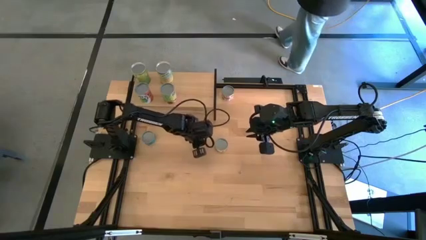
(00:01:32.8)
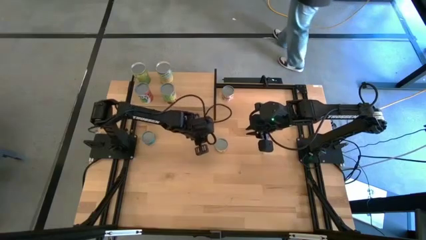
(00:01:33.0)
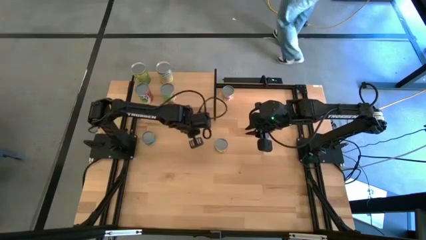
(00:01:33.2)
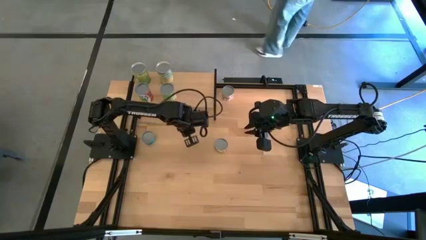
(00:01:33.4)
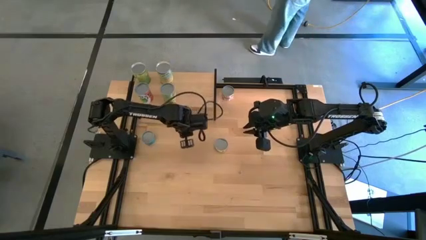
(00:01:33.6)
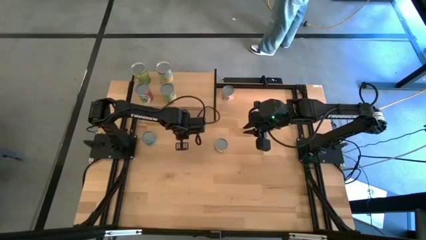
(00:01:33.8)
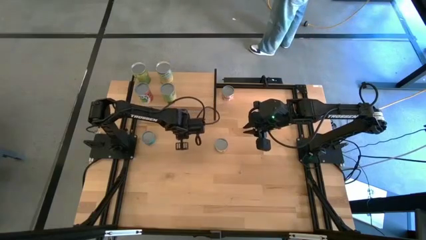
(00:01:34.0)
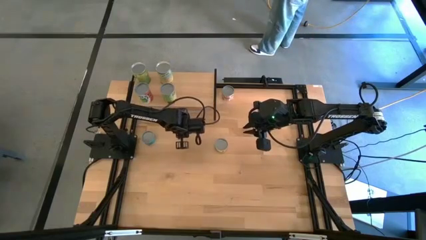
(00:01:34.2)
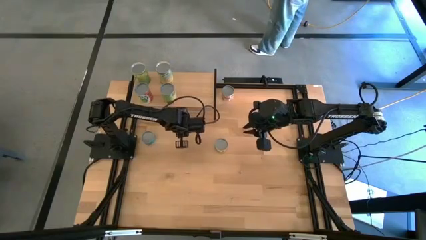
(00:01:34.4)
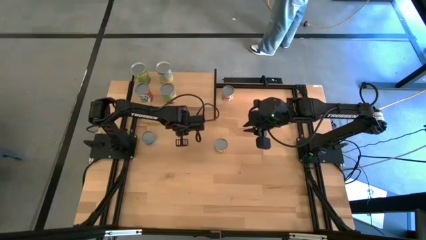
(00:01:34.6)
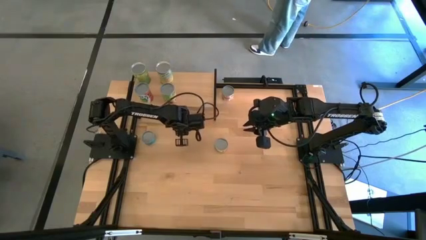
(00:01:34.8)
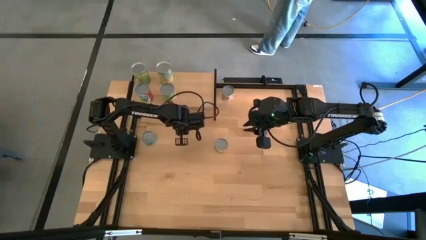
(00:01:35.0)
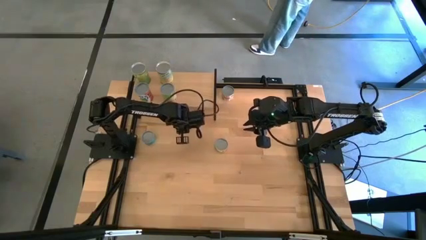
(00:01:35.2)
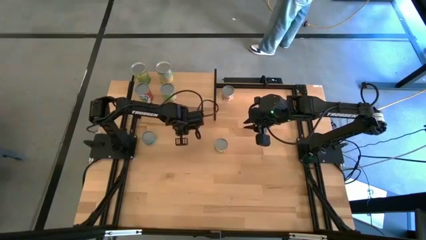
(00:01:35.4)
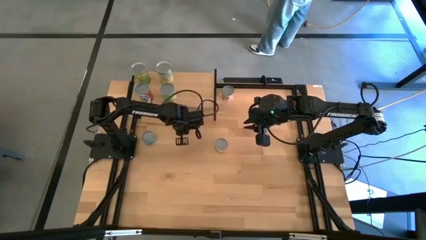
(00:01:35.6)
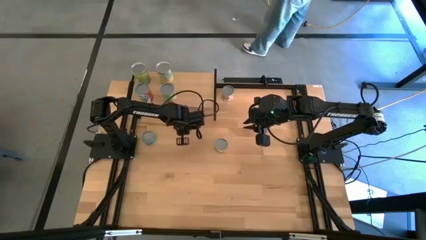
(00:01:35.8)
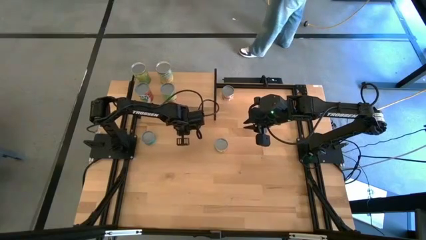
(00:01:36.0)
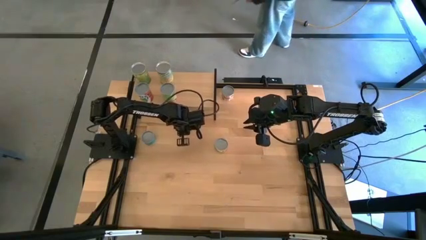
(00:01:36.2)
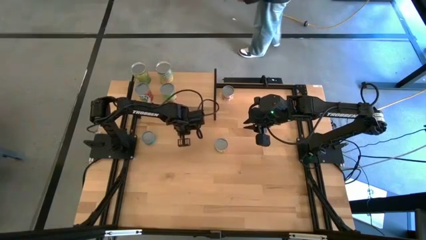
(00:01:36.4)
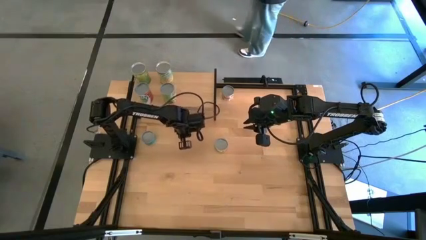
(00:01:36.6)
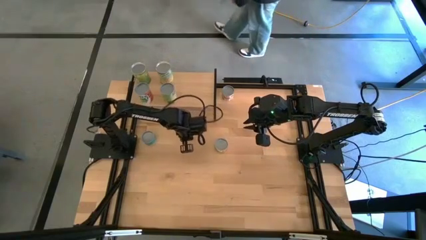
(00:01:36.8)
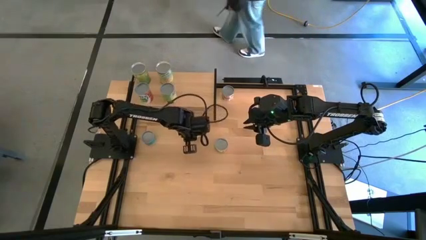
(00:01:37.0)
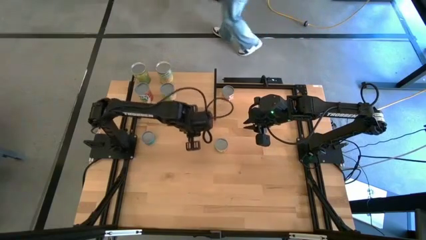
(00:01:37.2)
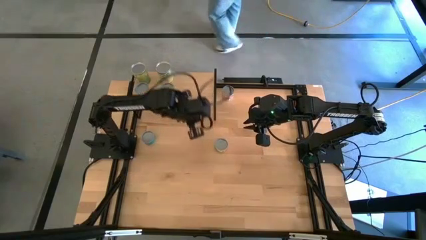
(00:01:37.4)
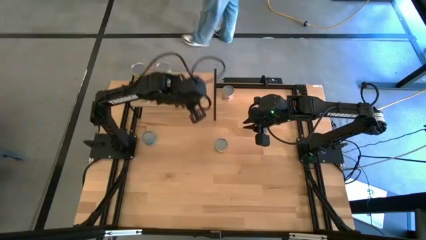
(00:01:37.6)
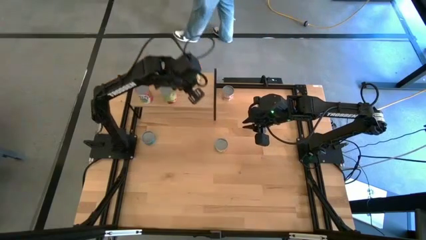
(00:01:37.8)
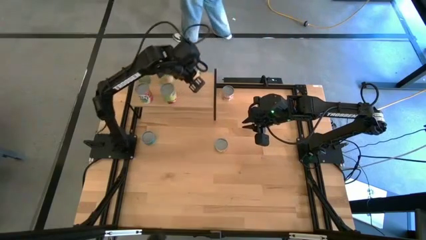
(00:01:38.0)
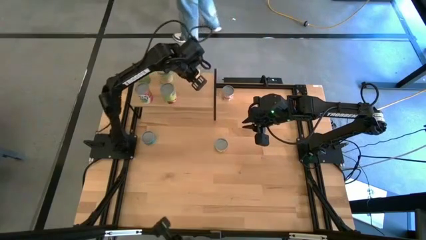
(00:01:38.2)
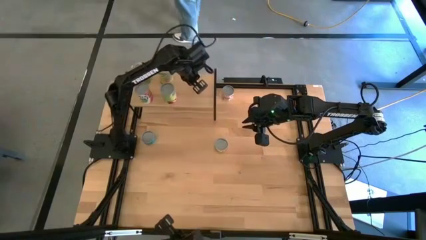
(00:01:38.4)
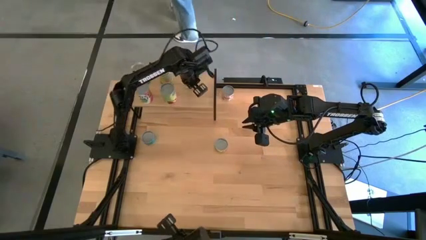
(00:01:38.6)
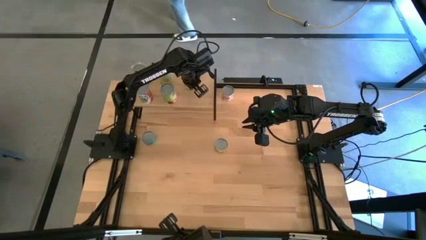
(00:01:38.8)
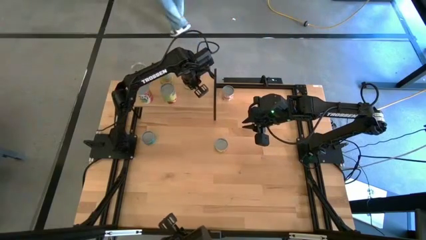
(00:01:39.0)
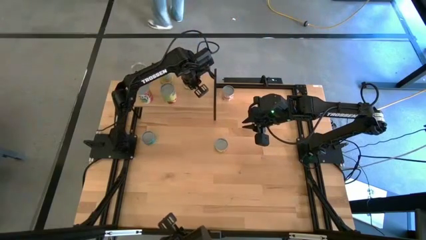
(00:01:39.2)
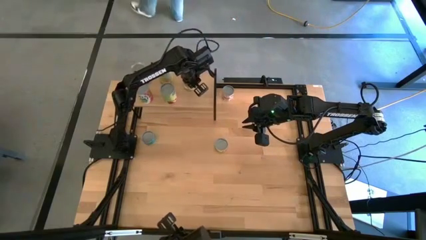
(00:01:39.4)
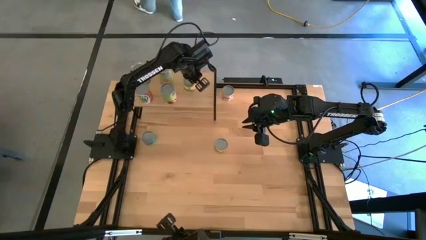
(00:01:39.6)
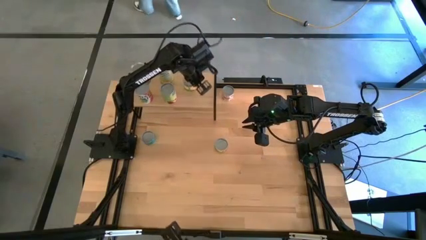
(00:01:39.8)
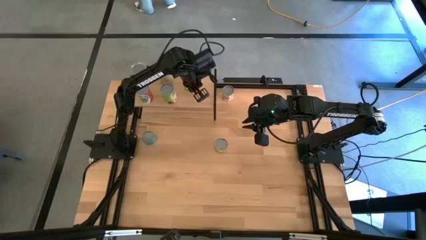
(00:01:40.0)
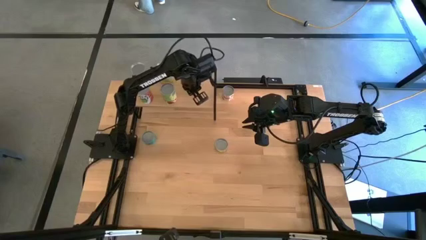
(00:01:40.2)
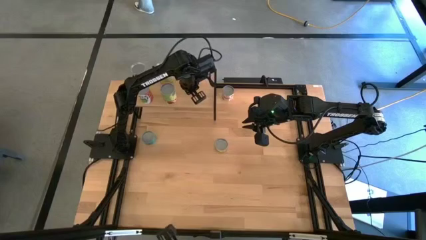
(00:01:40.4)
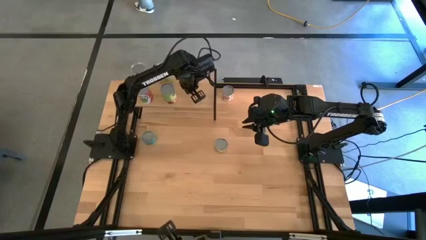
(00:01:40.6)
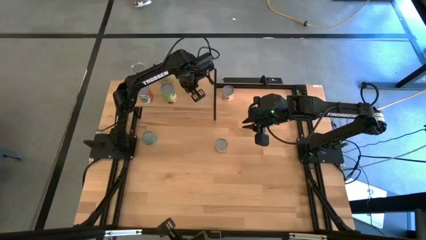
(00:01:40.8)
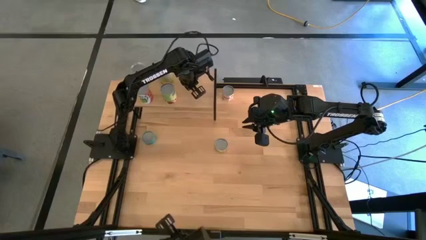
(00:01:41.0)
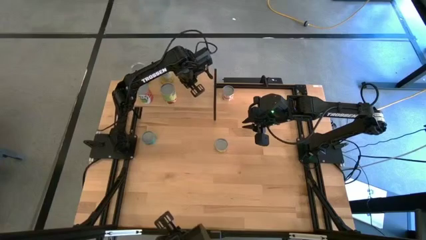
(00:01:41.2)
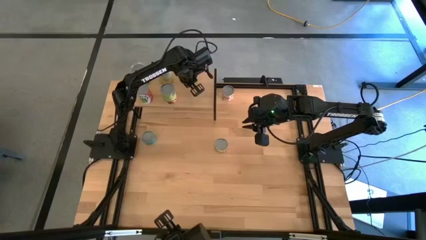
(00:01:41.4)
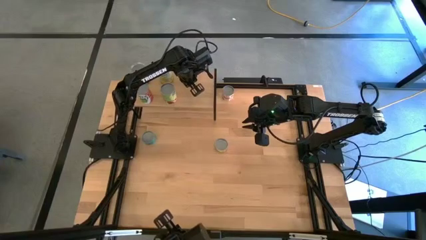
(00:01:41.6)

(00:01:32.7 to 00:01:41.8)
Task: Pick and place cans onto a shelf
Put the canned peaches on the shelf

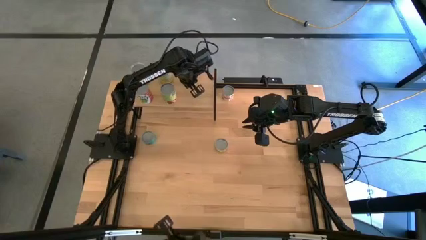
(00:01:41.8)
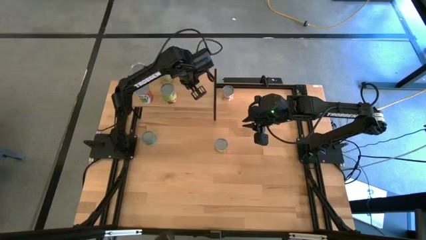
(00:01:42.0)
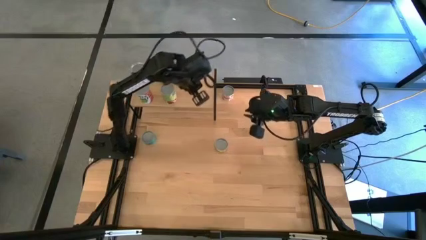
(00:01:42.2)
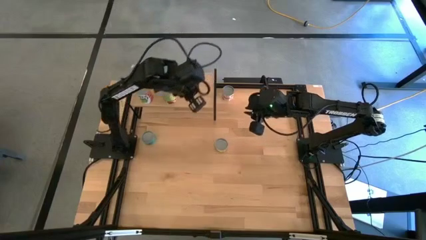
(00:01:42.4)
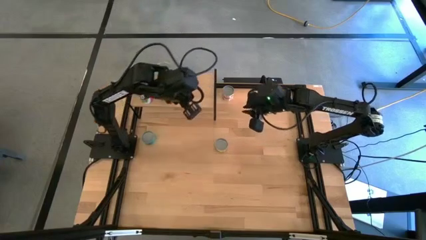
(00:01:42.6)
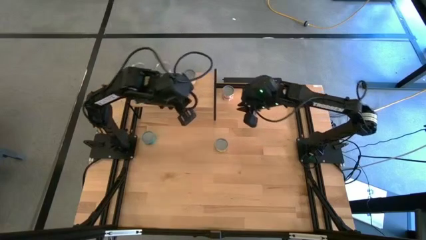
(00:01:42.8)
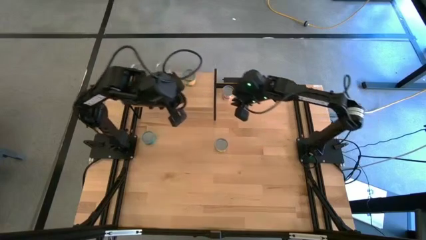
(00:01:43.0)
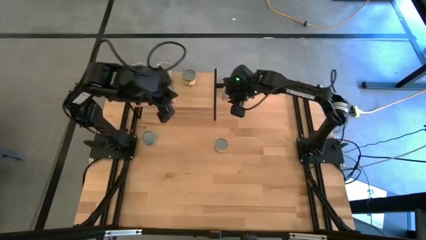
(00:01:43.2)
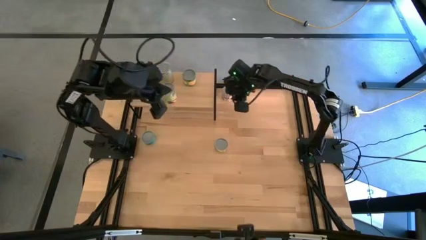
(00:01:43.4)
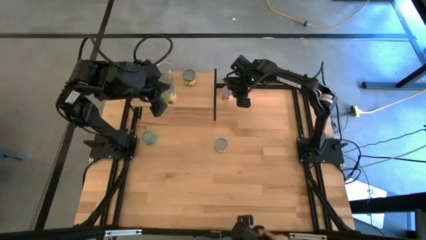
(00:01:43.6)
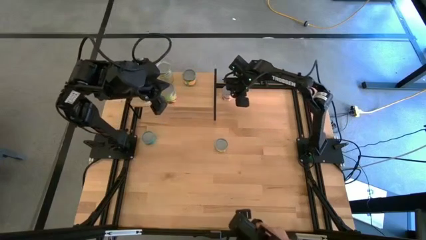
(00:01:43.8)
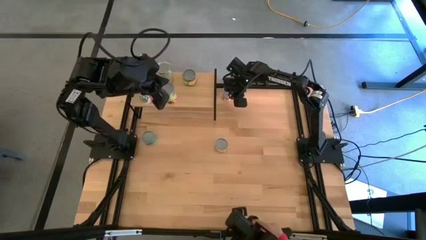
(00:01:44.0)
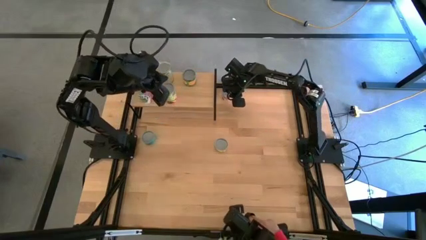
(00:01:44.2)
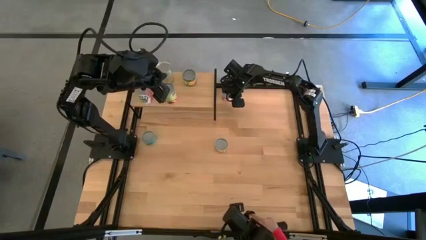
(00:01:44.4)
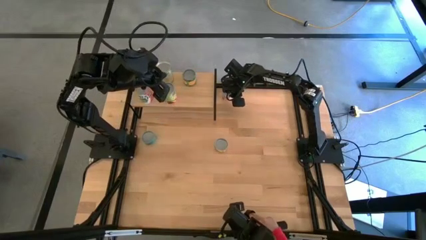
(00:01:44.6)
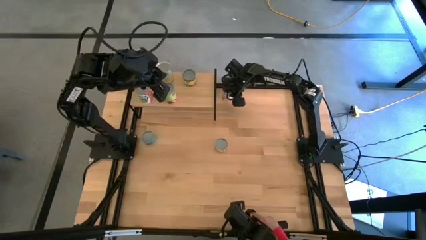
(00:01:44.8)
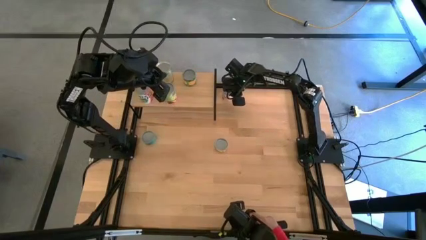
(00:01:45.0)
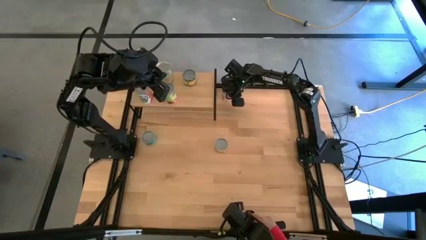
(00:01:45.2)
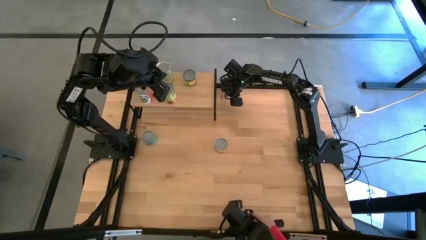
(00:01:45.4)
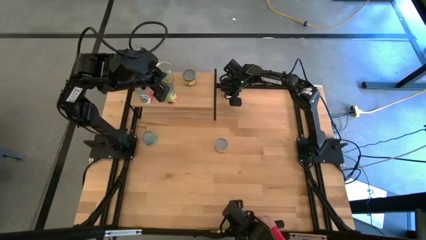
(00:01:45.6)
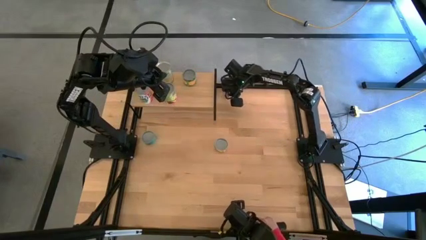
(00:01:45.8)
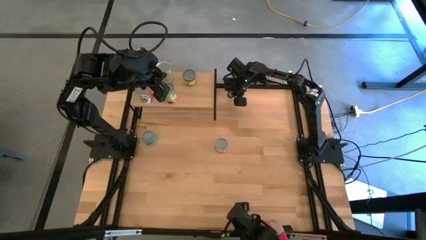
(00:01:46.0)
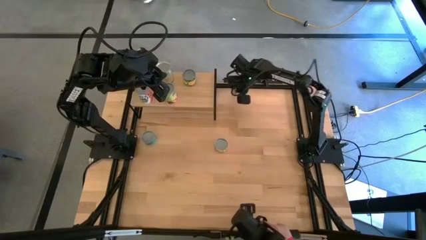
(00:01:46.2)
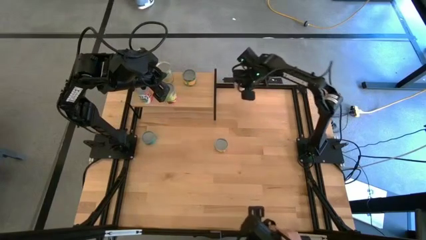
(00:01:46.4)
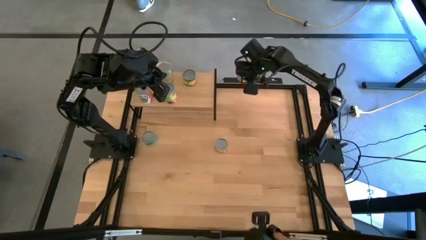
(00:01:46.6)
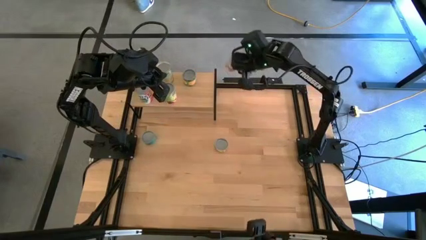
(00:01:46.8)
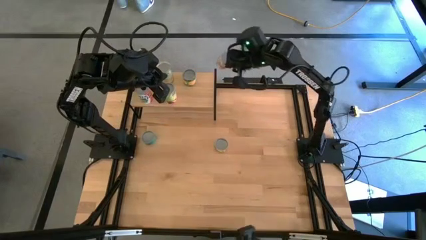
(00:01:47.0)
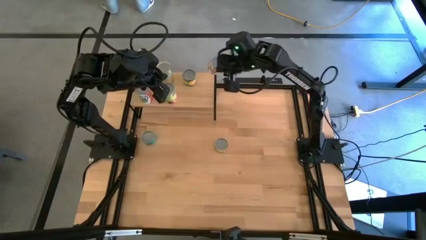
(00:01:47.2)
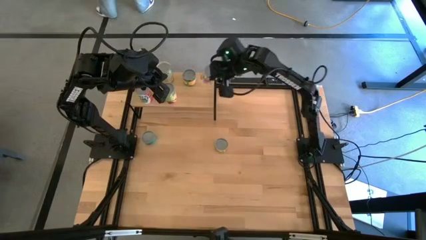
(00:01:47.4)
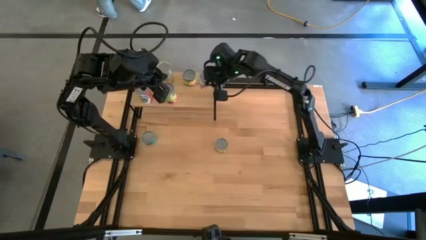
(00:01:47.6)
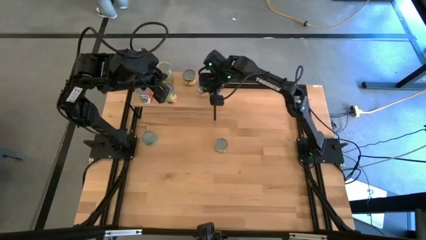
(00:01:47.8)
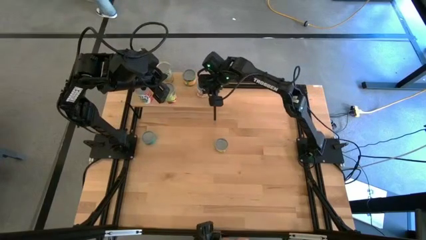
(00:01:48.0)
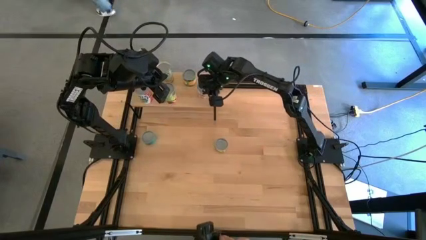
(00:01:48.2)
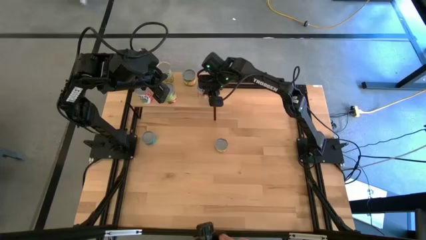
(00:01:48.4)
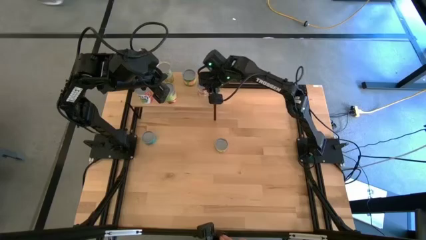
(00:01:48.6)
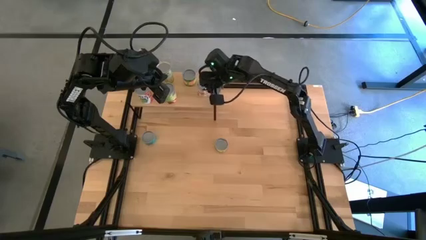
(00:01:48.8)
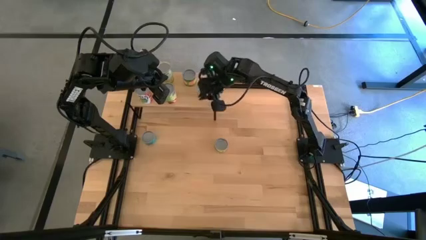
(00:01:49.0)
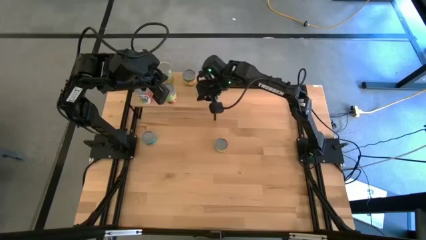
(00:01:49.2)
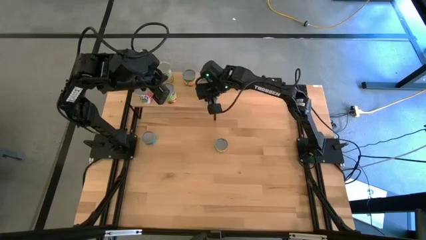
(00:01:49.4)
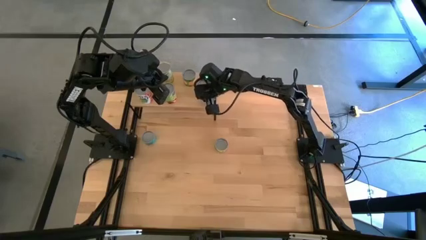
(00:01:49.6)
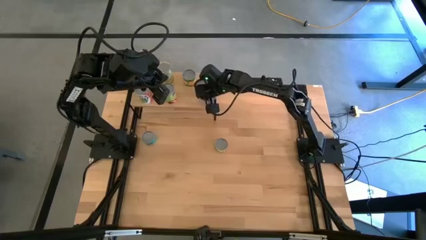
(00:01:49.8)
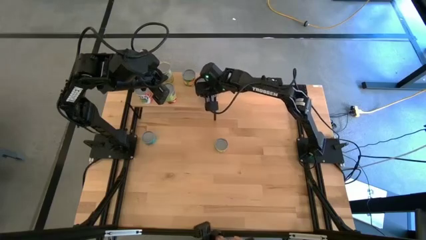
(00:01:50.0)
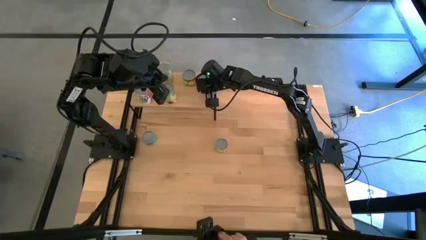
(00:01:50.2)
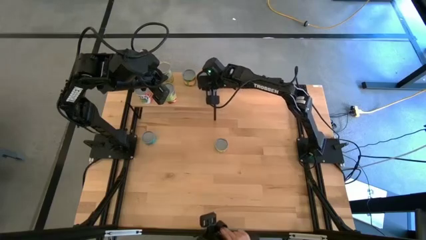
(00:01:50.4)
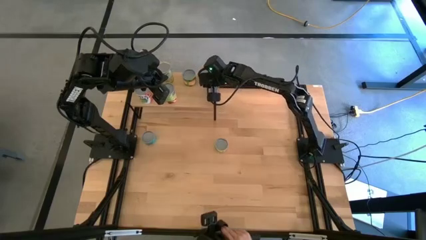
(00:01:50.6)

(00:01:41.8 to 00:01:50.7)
Put the canned tomatoes on the shelf
